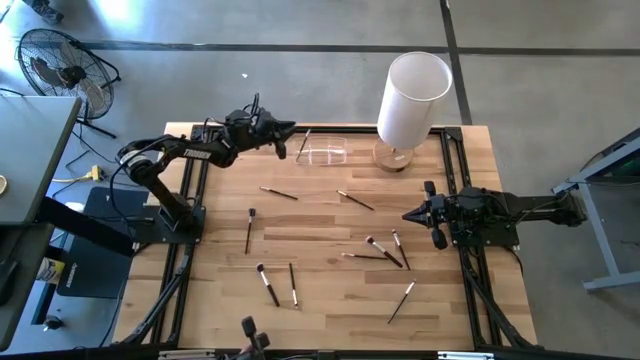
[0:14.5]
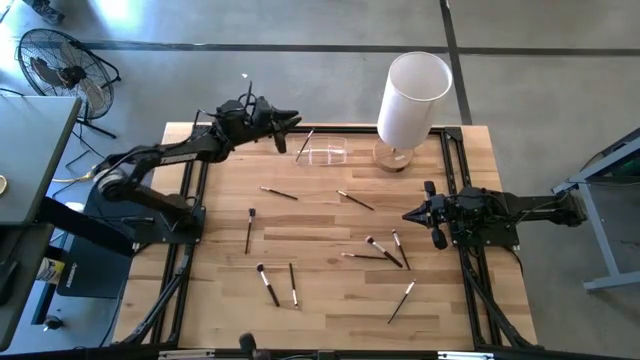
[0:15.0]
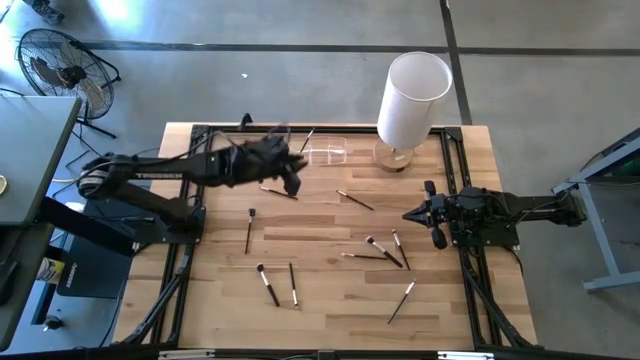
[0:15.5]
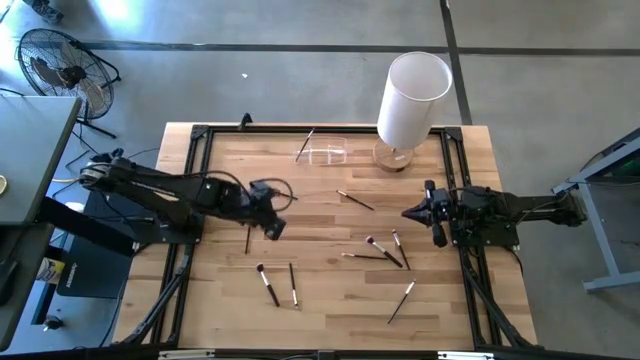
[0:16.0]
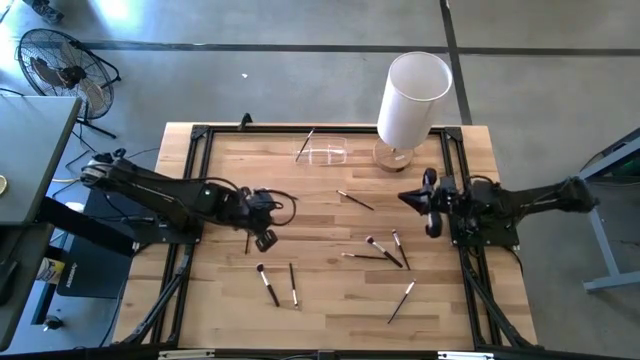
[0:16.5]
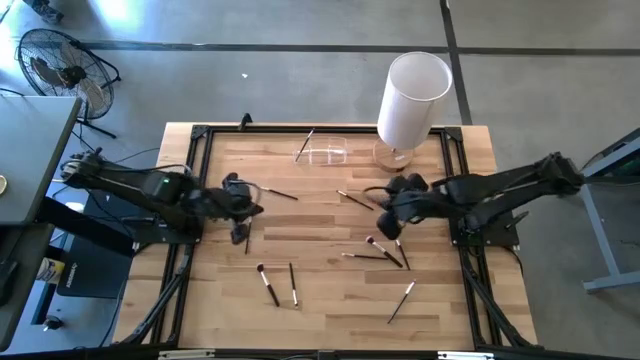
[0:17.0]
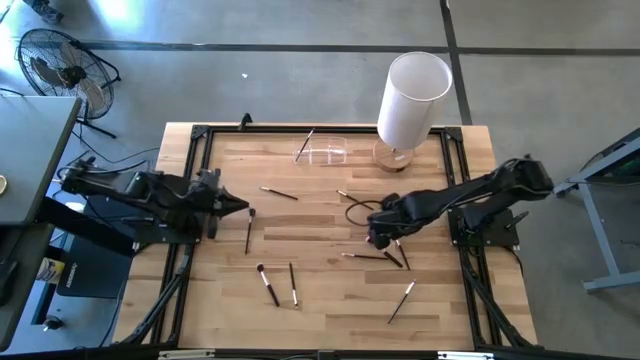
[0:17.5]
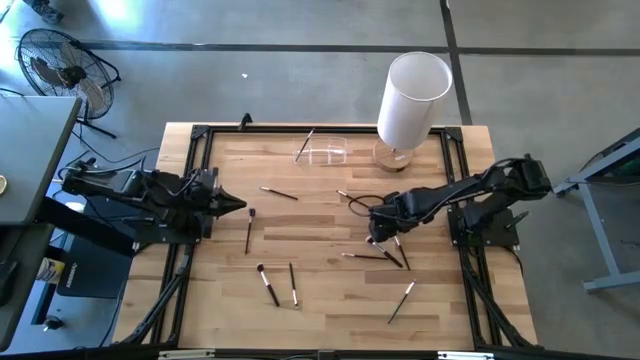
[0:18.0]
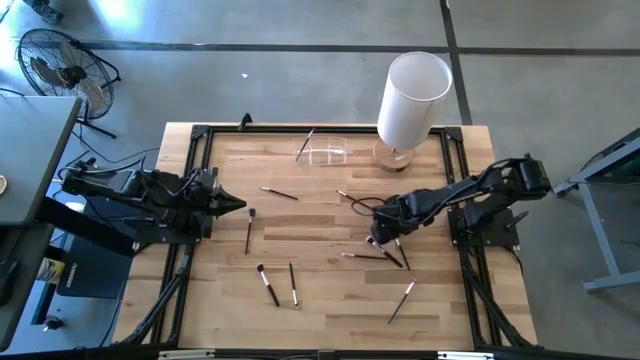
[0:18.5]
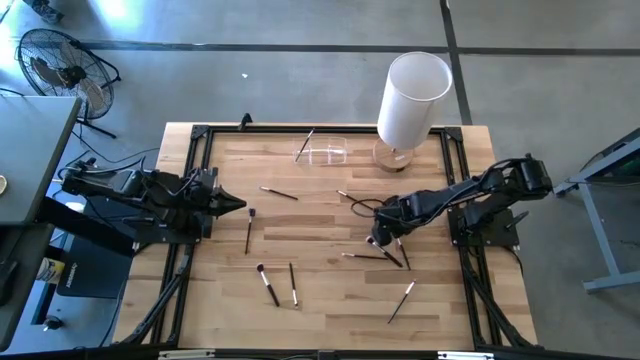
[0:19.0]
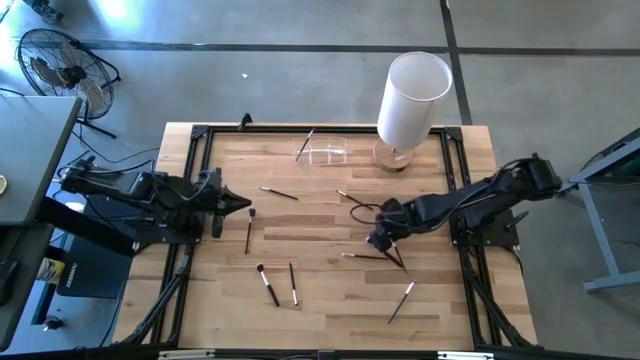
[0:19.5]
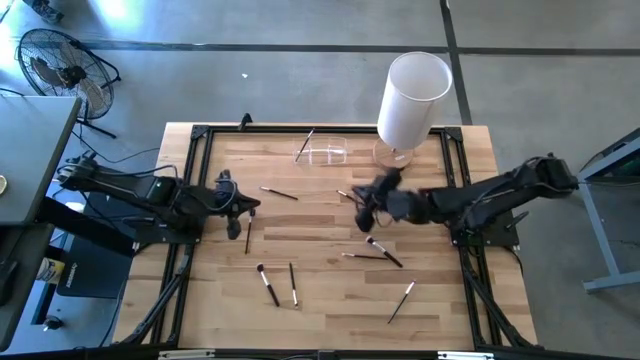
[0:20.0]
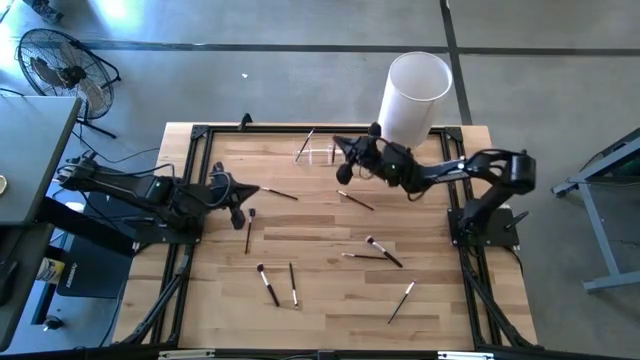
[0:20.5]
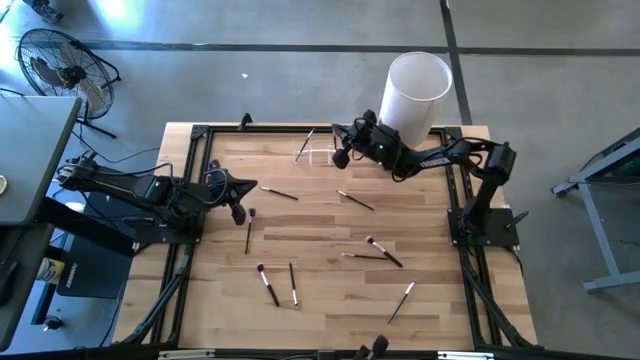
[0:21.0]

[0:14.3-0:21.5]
Task: Put items in baskets/containers
Put the black eyeshadow brush into the transparent organizer

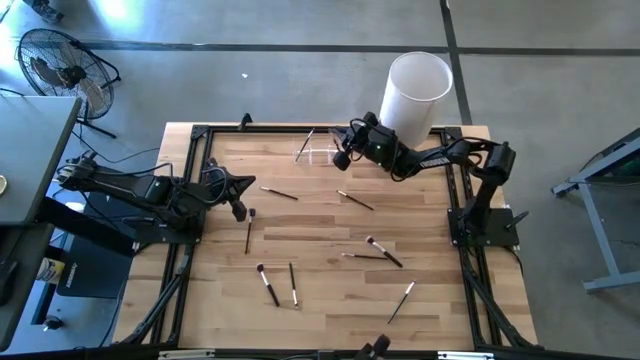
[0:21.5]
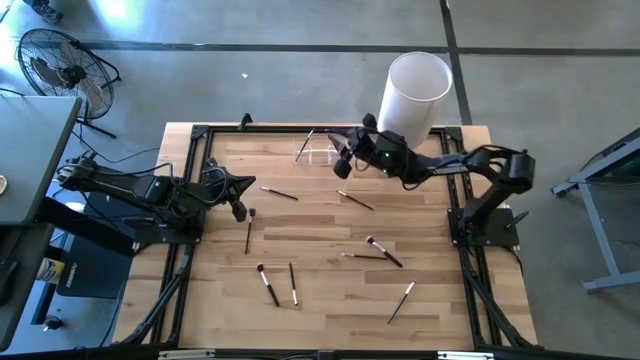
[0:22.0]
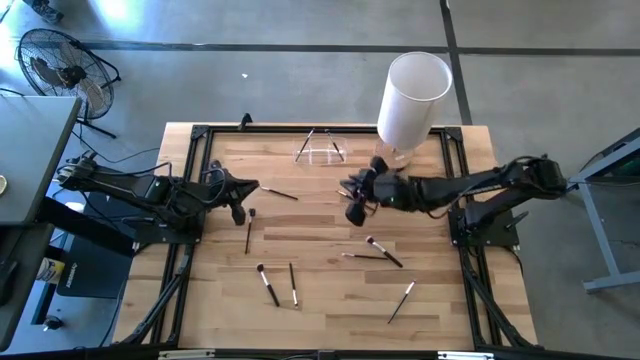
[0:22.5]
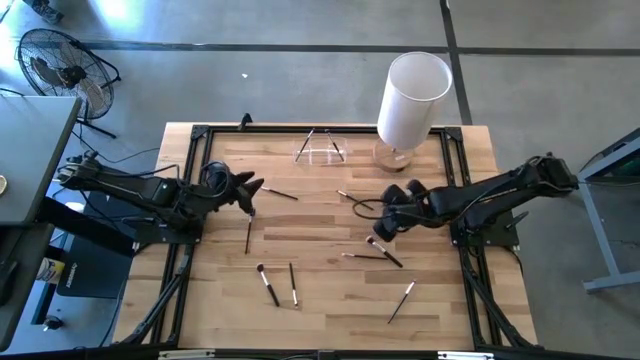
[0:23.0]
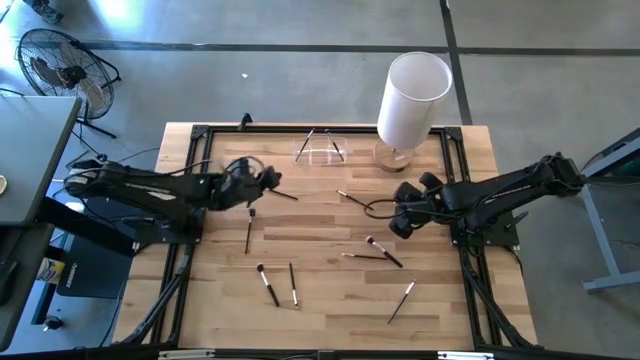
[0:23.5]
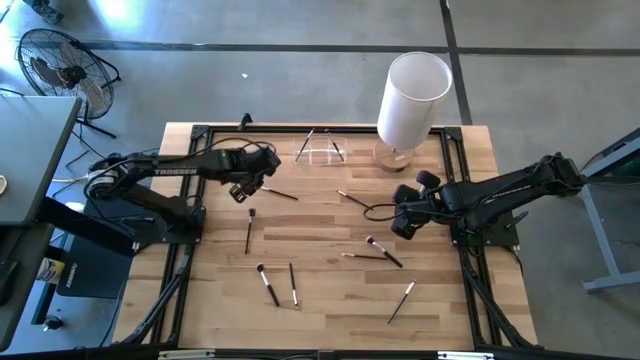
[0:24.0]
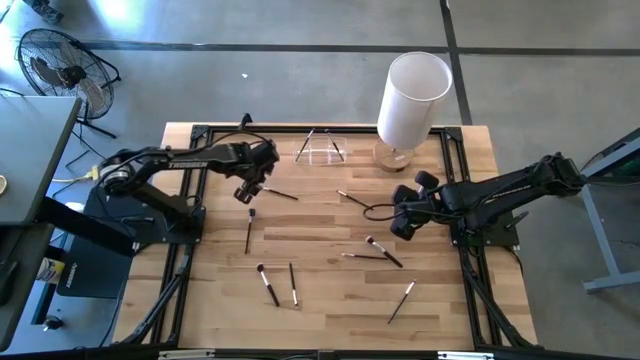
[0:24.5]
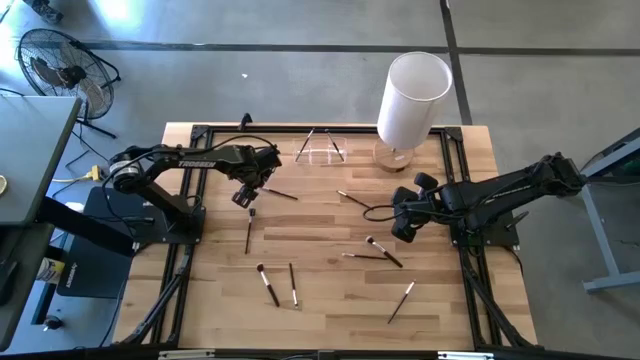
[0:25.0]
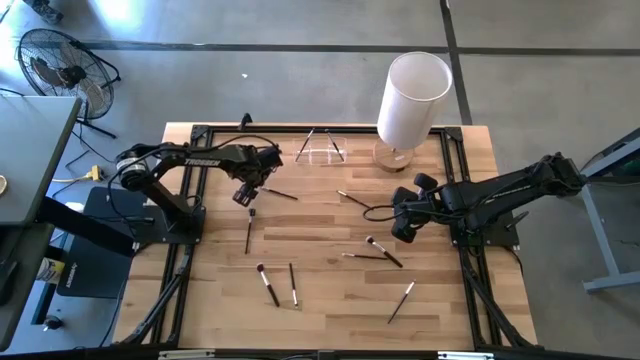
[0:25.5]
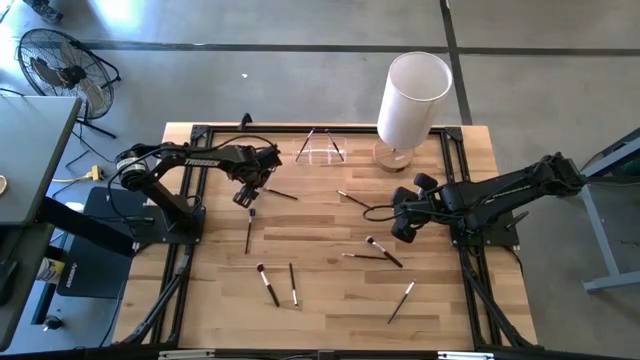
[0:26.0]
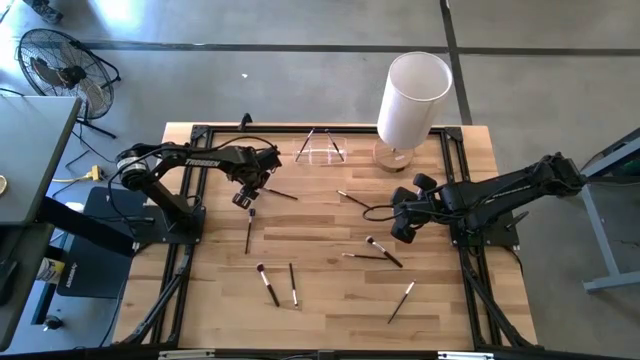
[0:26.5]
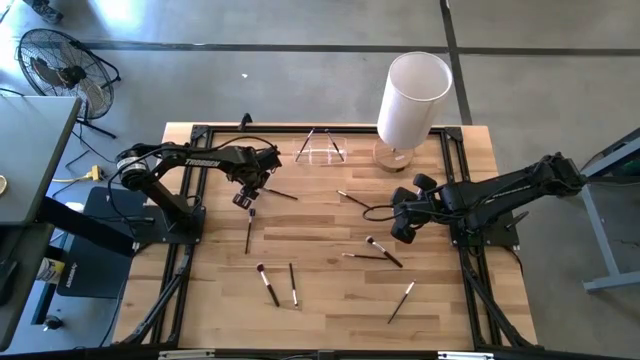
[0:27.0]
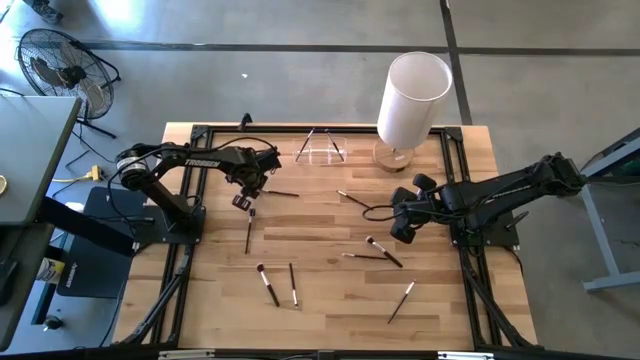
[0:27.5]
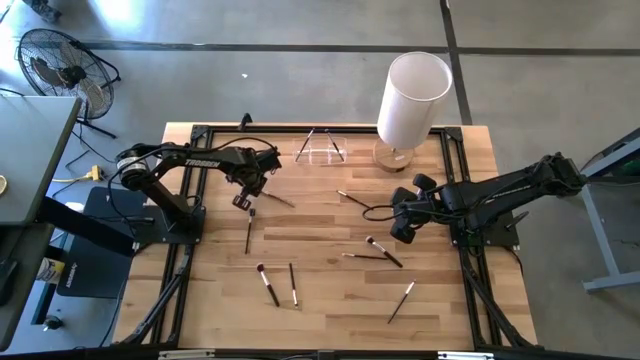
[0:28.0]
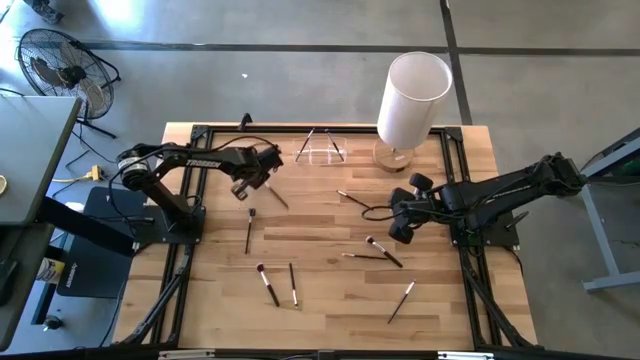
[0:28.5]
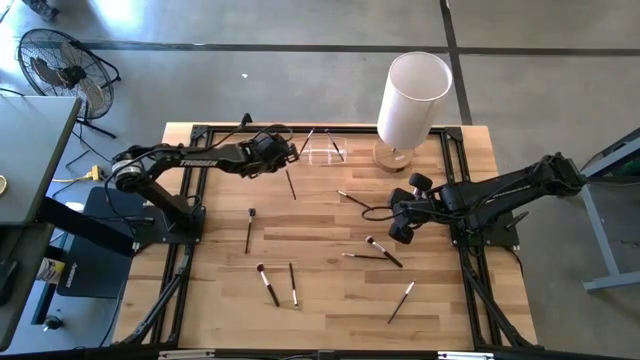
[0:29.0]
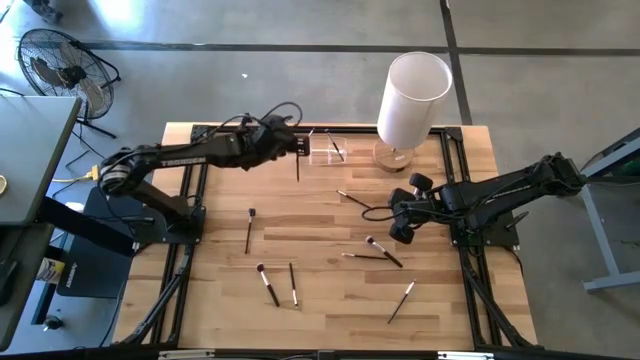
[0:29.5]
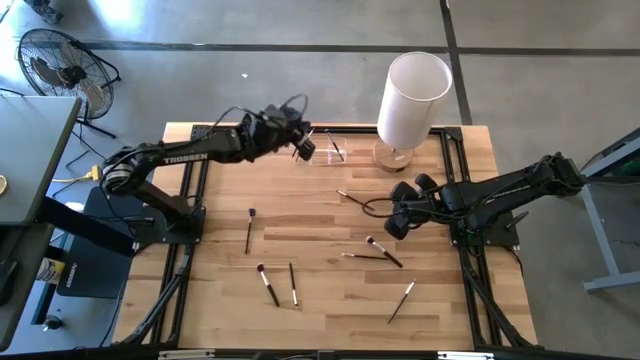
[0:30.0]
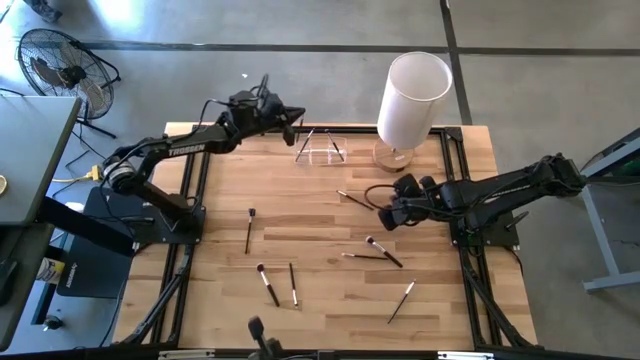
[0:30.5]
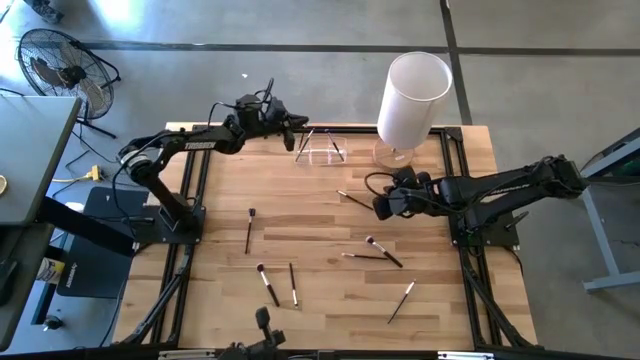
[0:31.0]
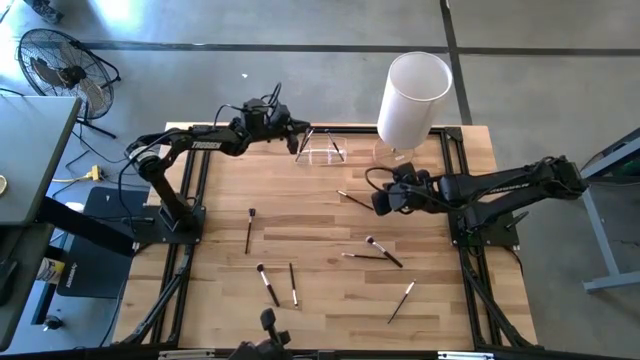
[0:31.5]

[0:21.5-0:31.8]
Put the black eyeshadow brush into the transparent organizer

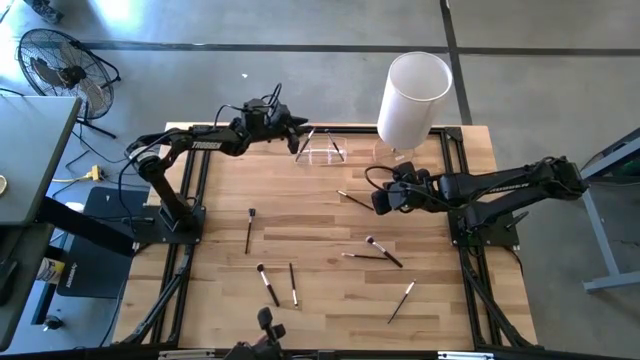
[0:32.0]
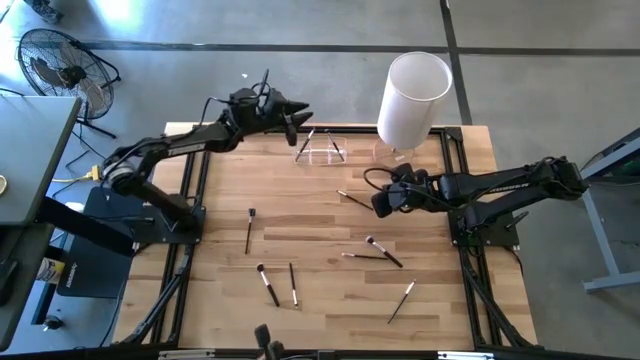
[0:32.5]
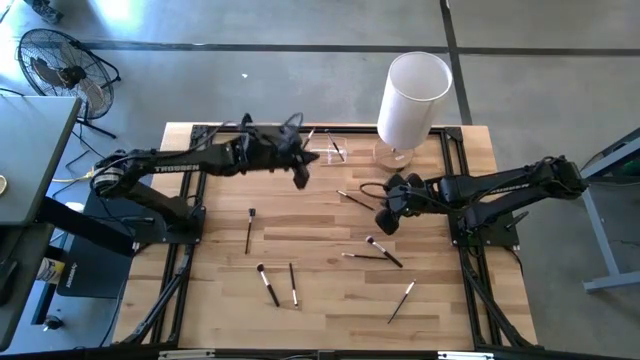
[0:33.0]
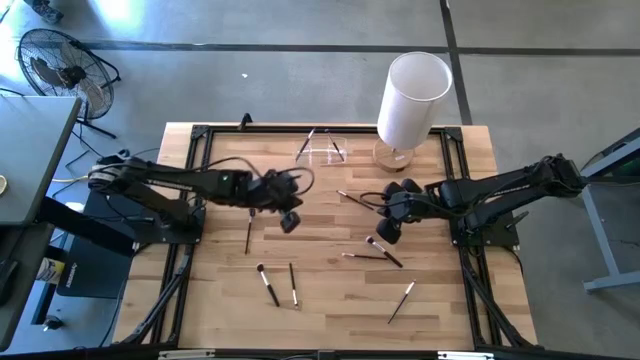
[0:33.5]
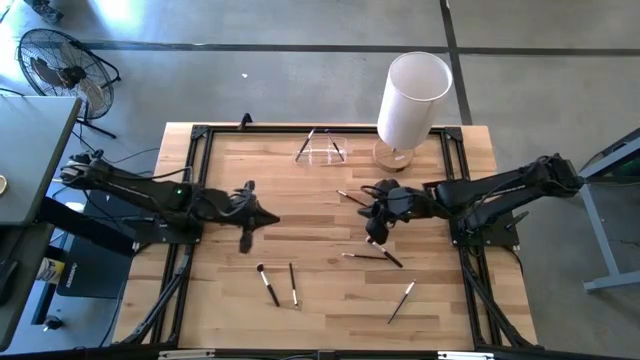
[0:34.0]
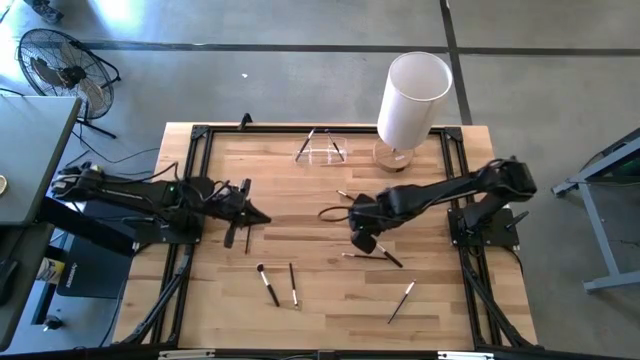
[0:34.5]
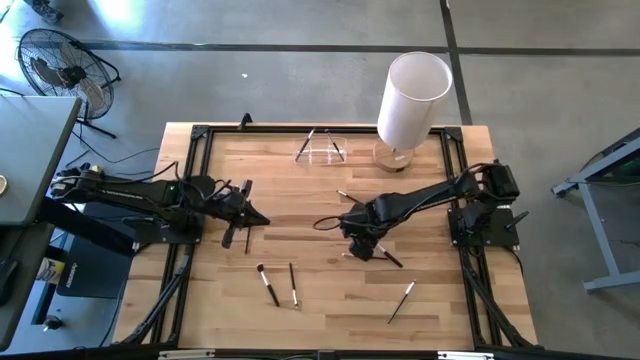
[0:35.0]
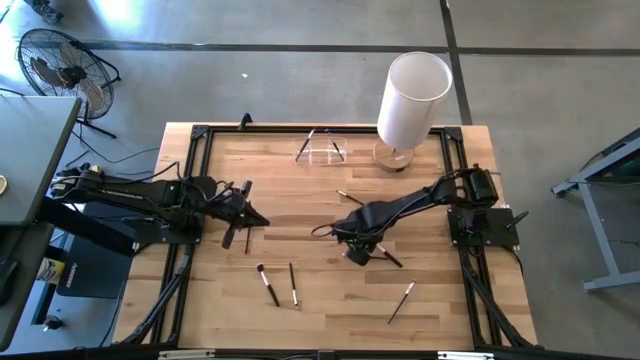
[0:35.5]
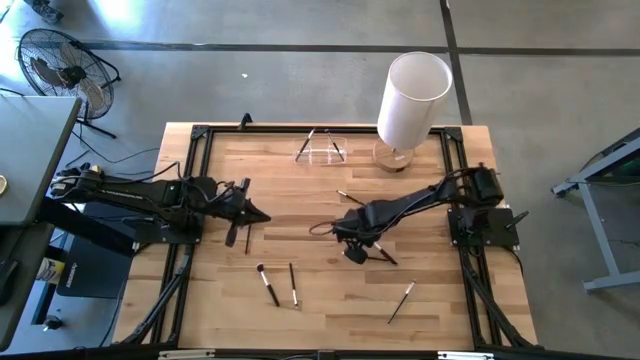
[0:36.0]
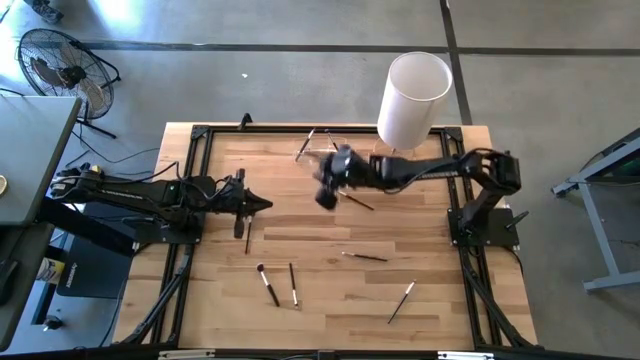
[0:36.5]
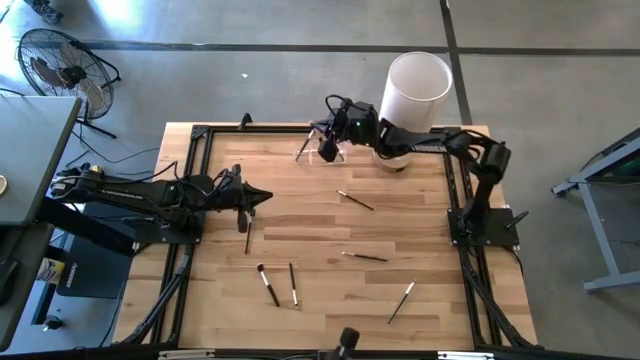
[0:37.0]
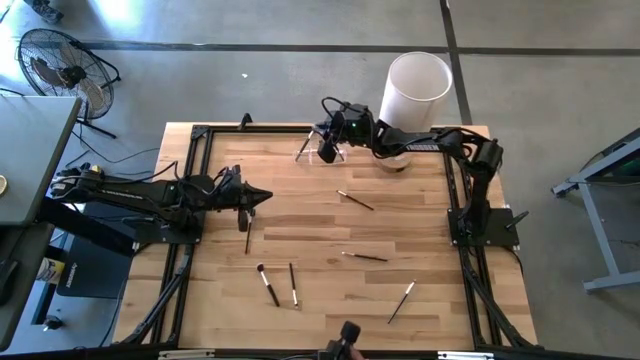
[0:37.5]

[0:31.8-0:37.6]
Put the black powder brush into the transparent organizer
